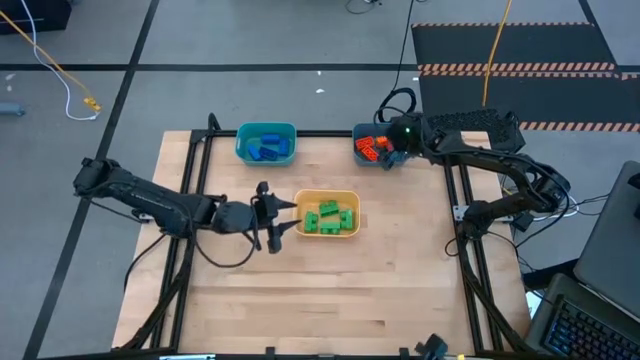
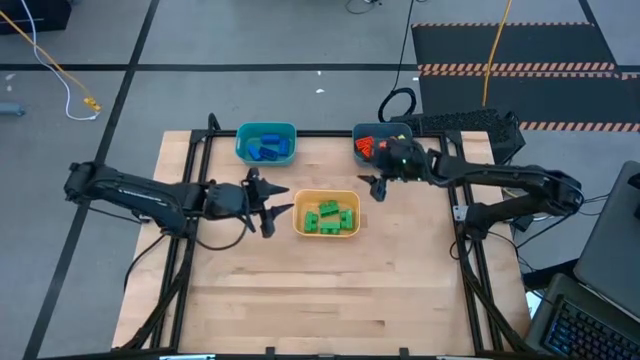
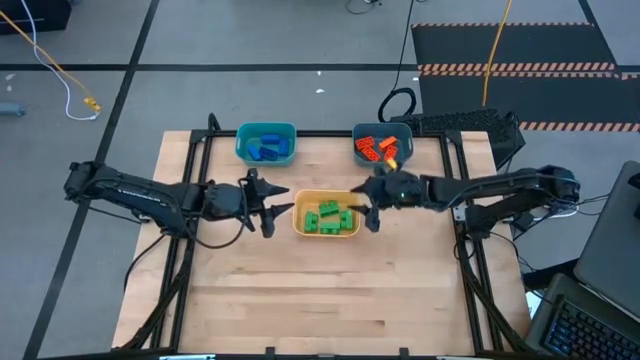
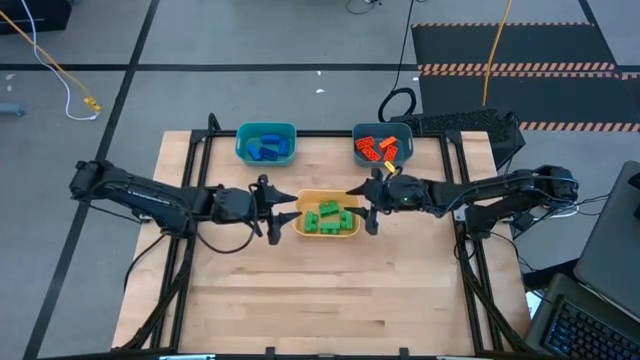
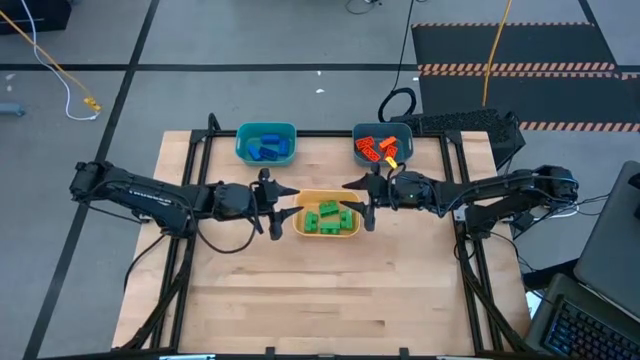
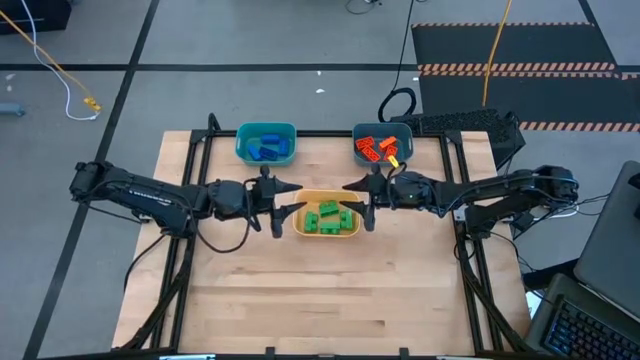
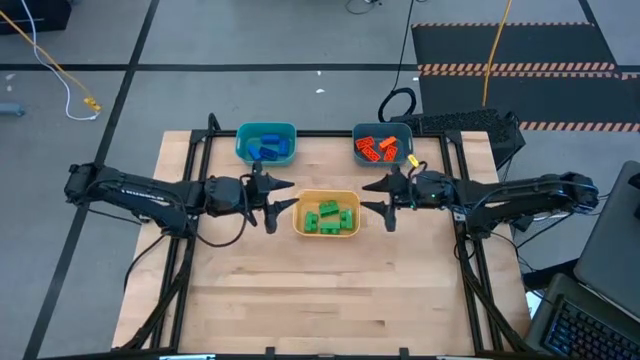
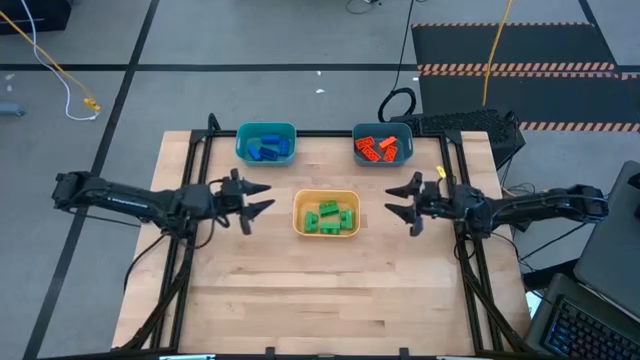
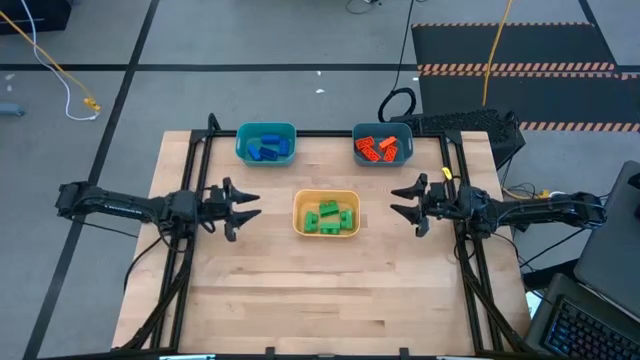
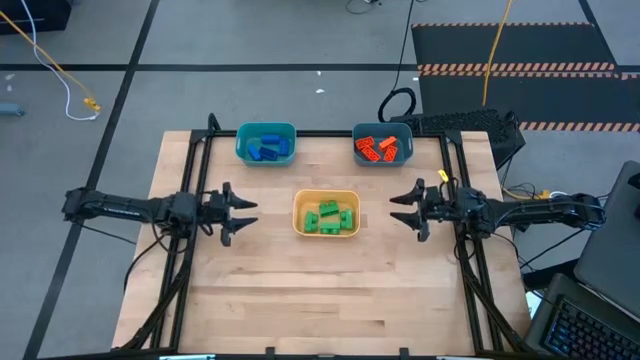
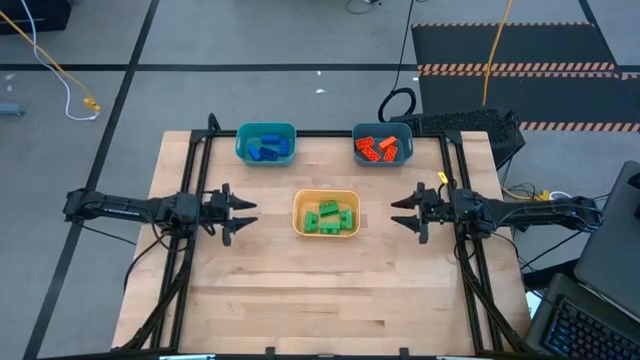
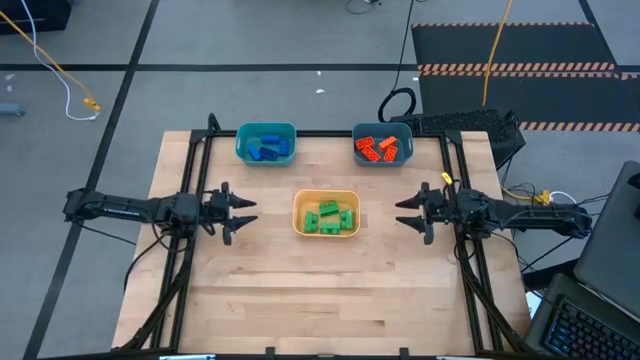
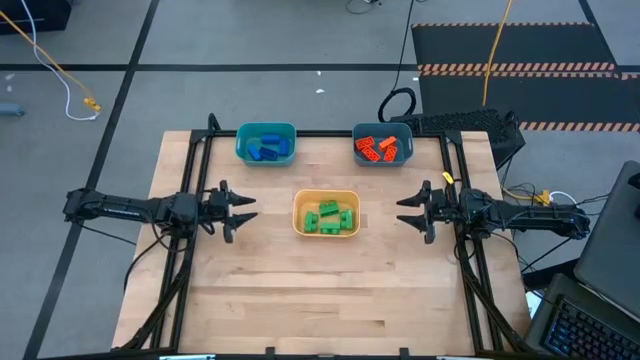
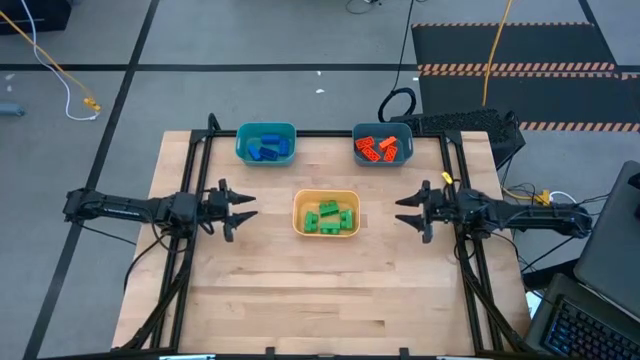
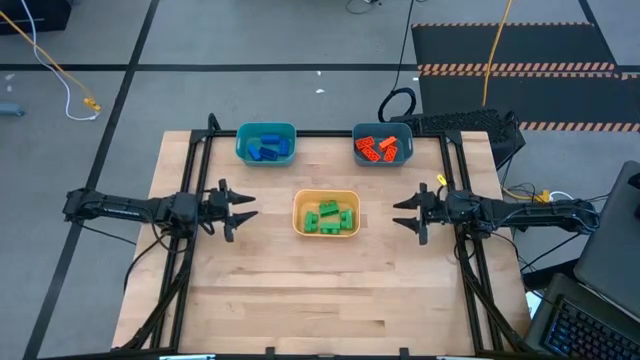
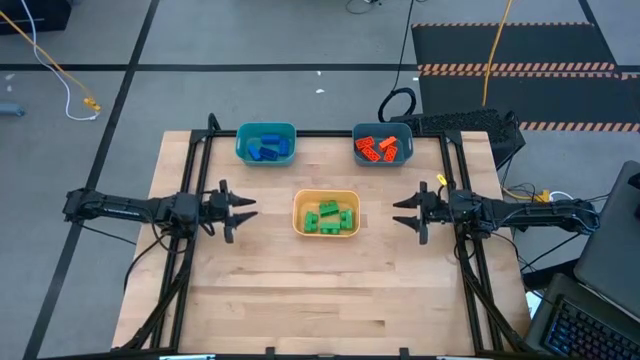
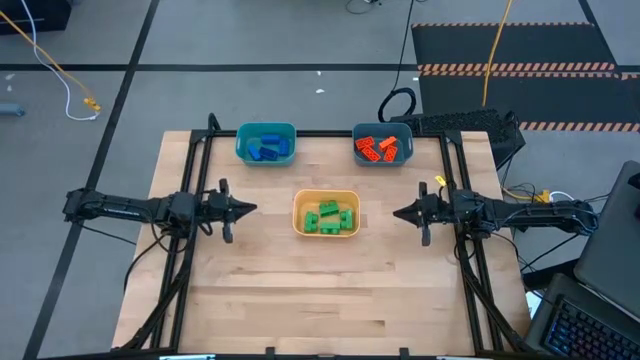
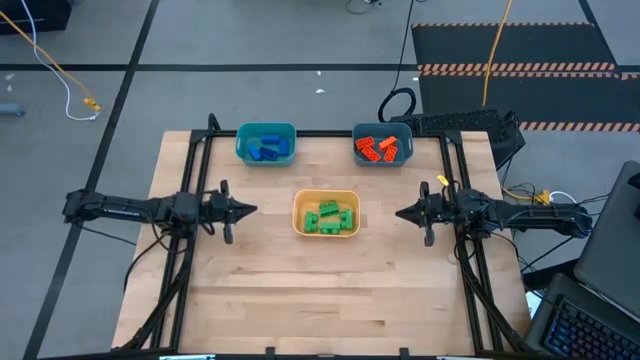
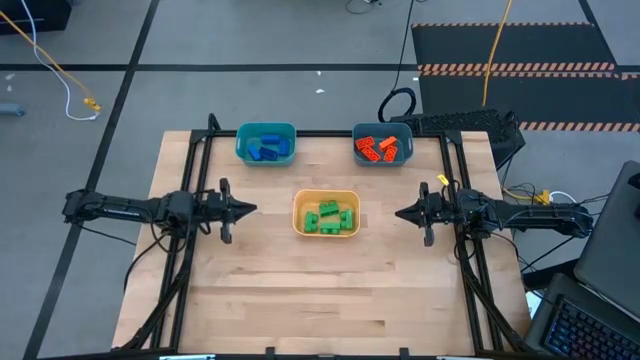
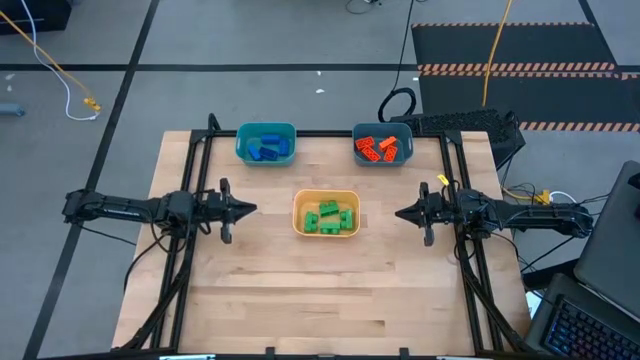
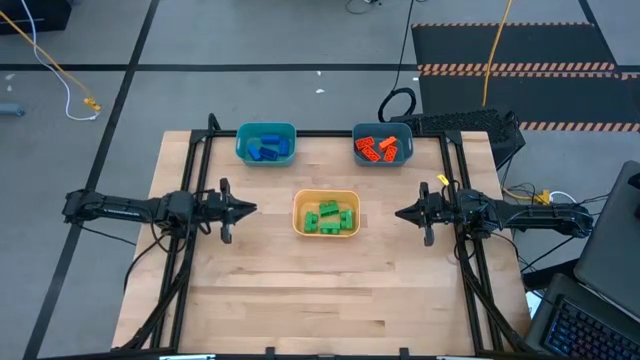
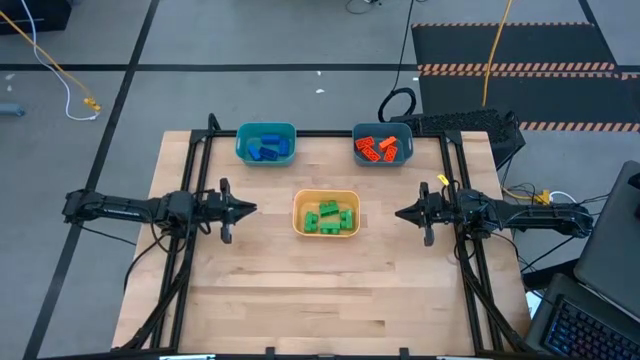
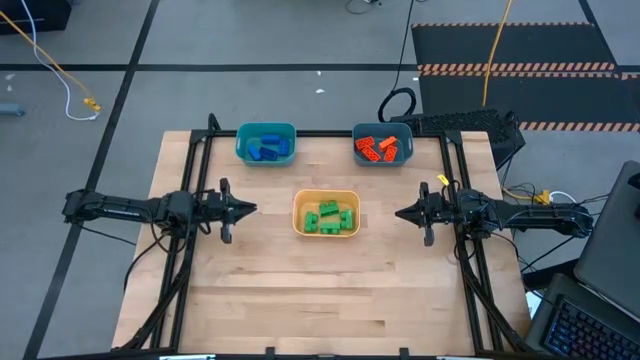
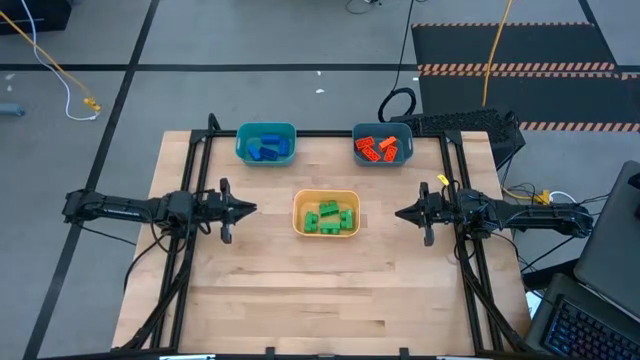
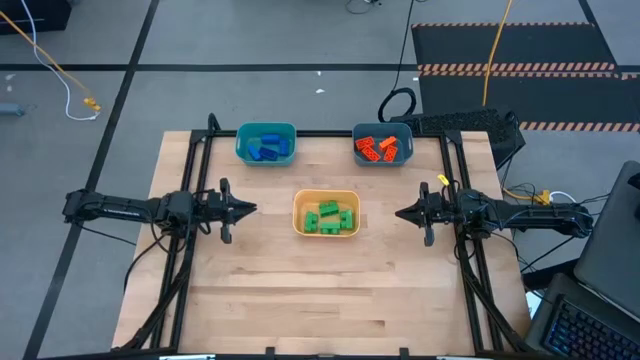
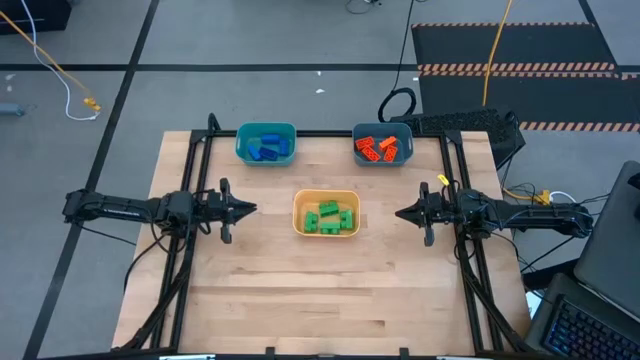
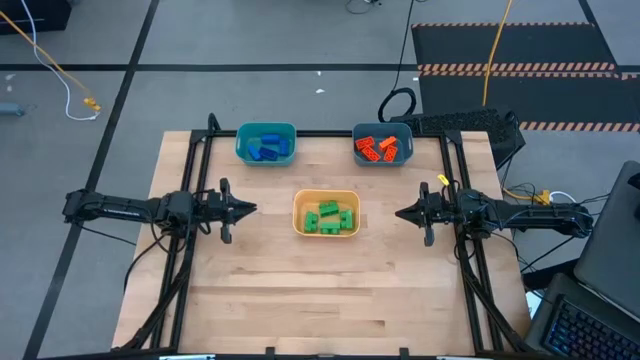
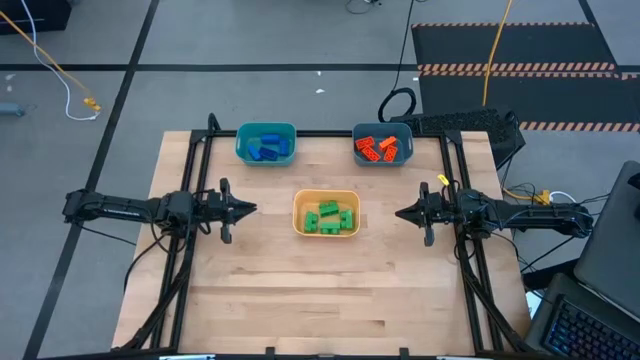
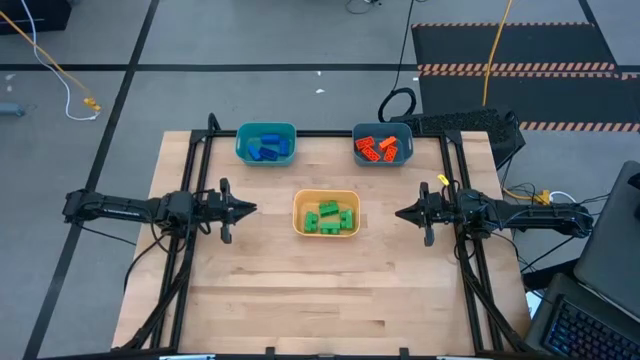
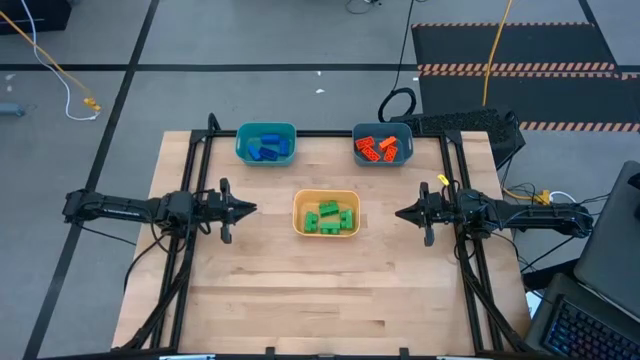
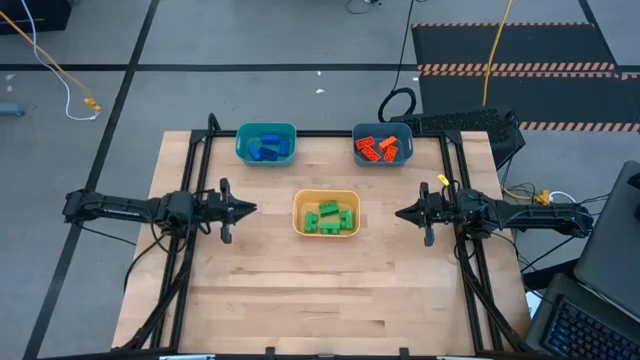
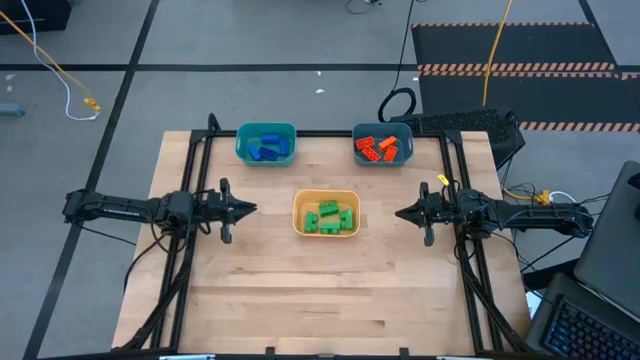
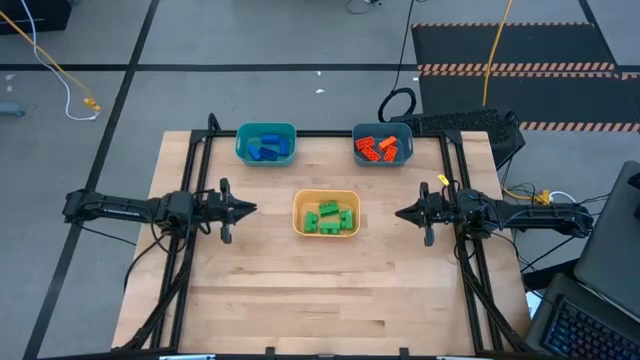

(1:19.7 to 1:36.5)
Task: Sort & place blocks by color
Return to Home Position

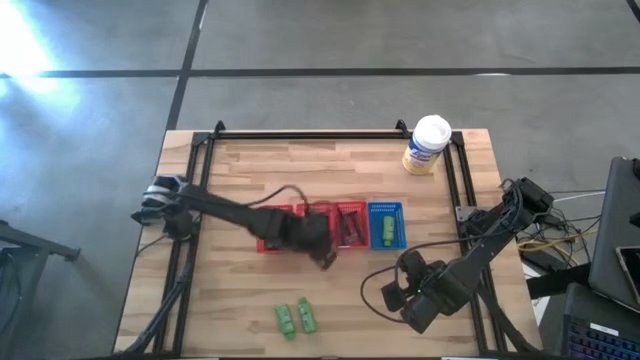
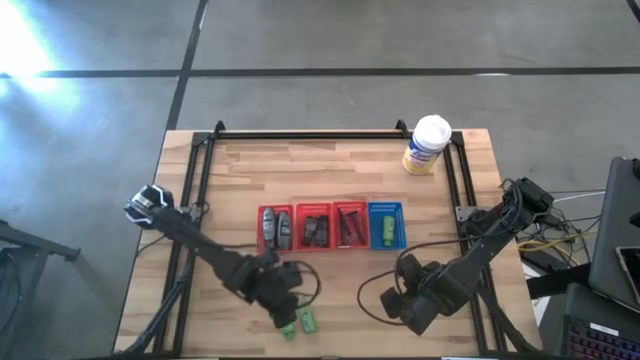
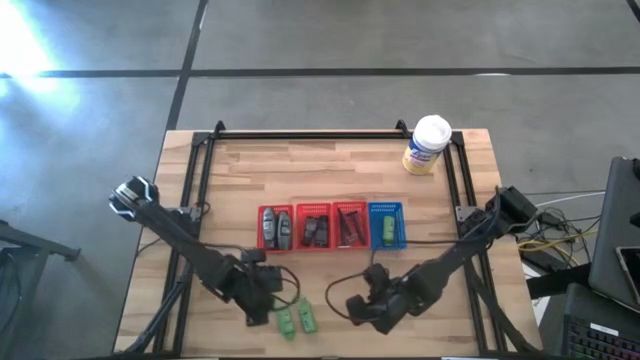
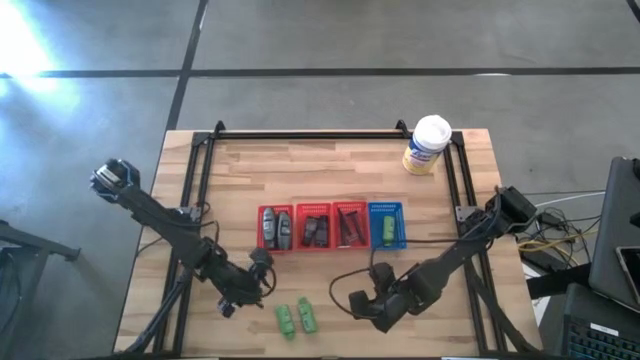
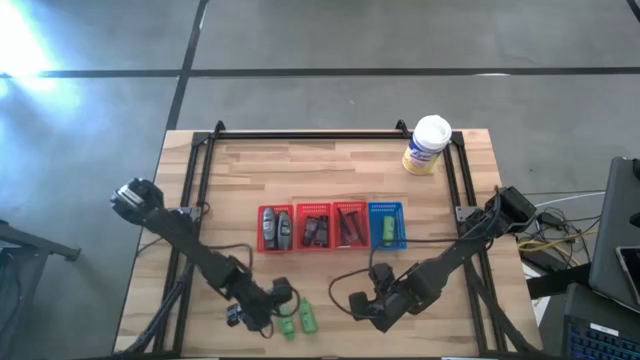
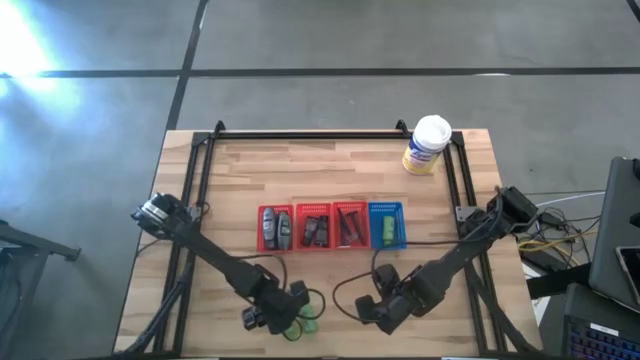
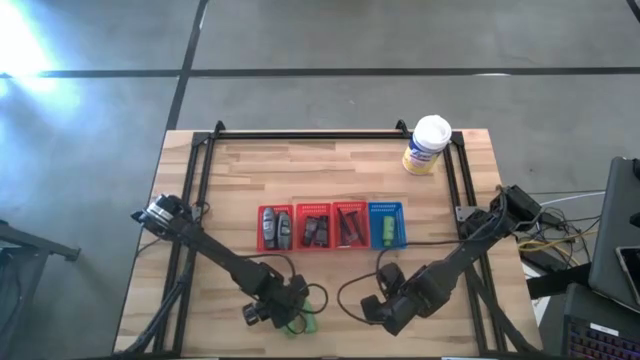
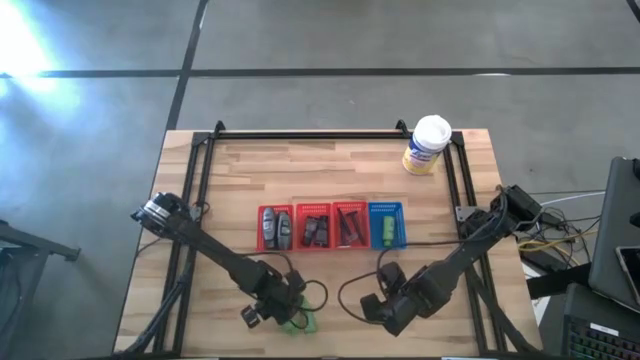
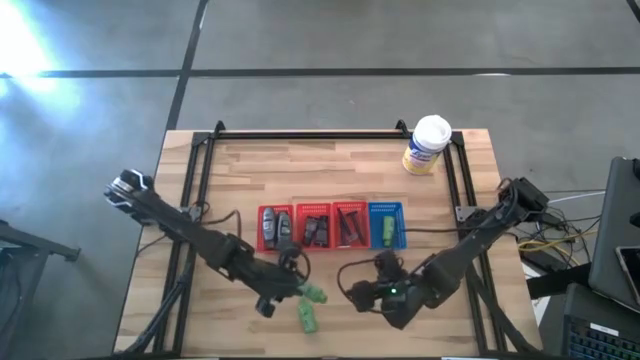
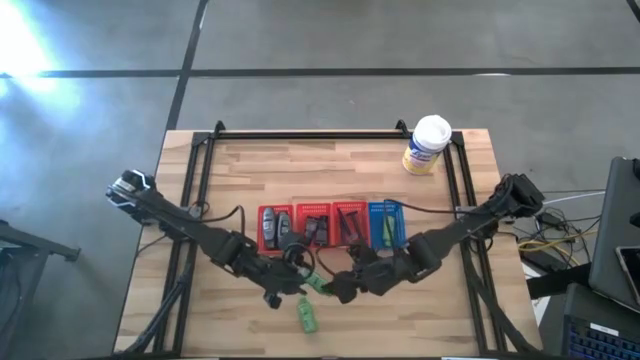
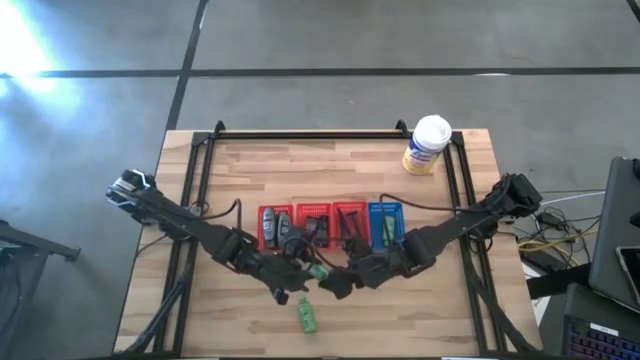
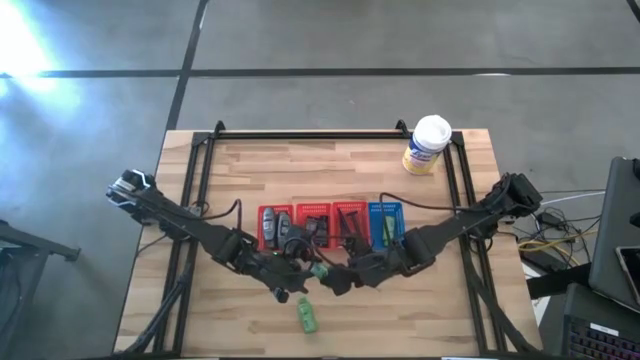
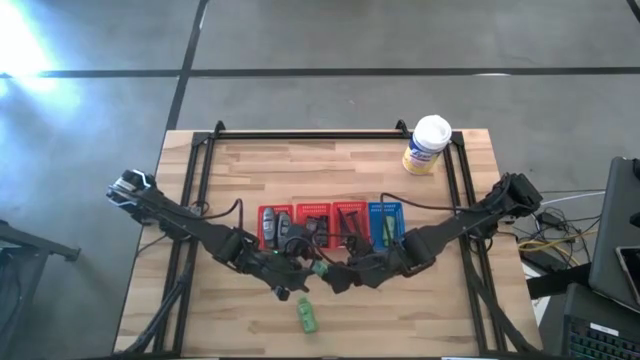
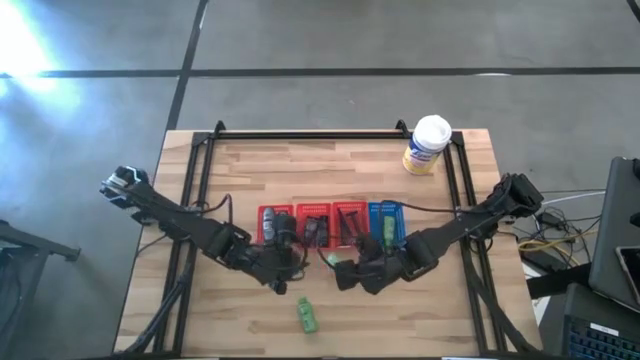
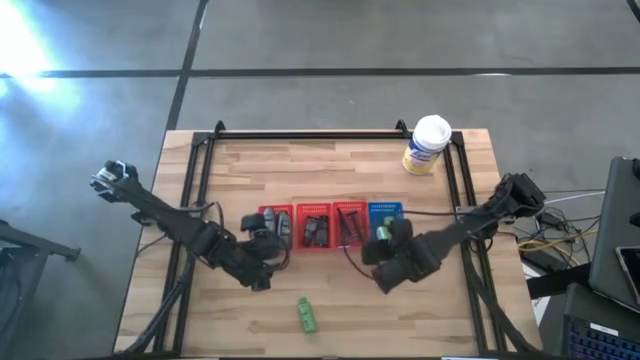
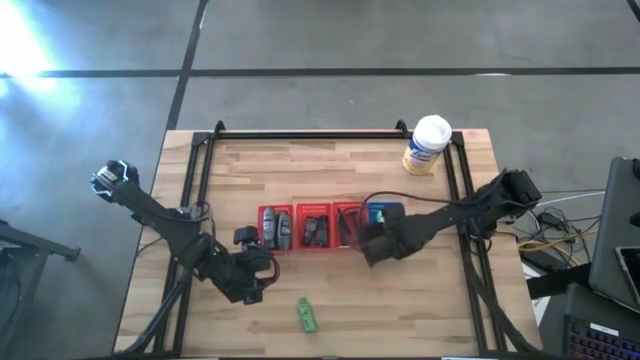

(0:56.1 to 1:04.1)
Task: Pick & Place Travel size toiletries
Put the green shampoo into the blue bin
